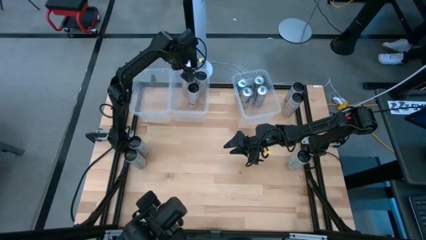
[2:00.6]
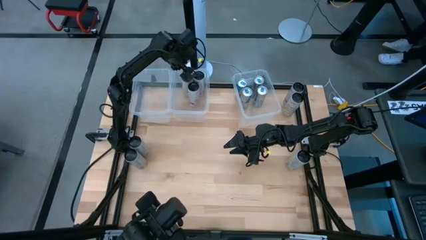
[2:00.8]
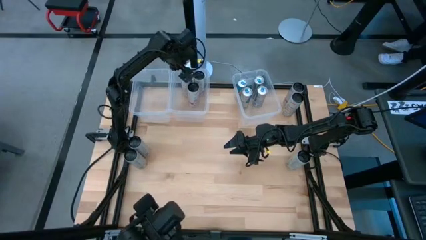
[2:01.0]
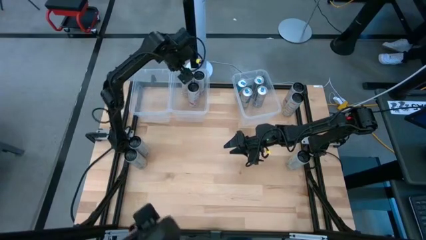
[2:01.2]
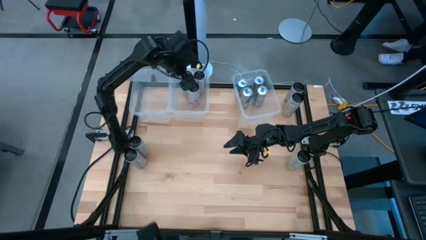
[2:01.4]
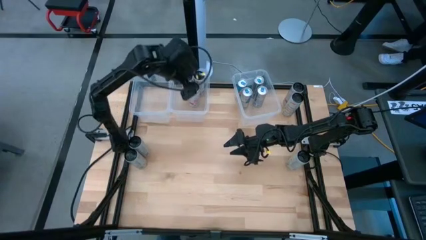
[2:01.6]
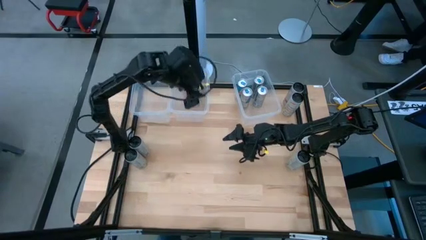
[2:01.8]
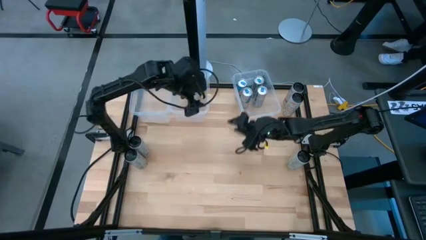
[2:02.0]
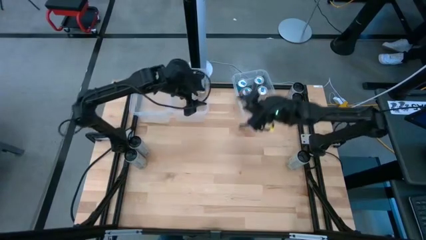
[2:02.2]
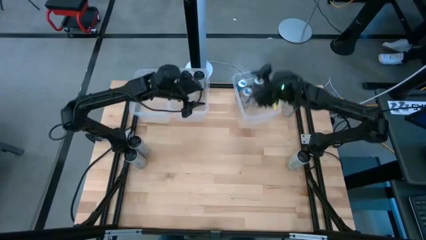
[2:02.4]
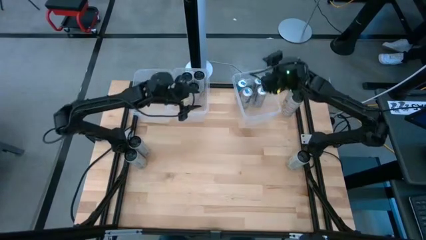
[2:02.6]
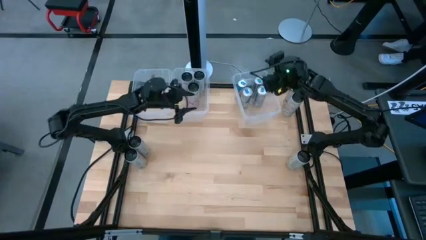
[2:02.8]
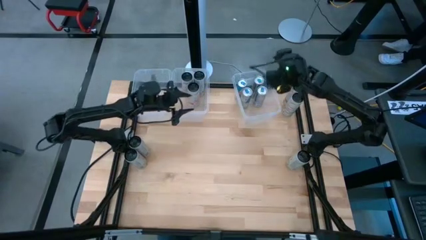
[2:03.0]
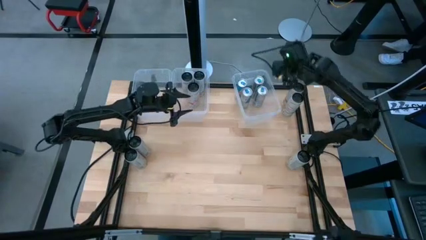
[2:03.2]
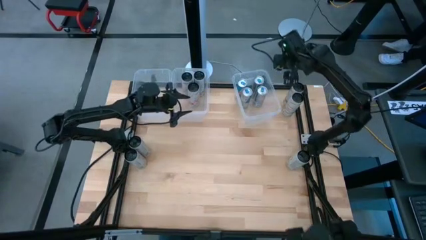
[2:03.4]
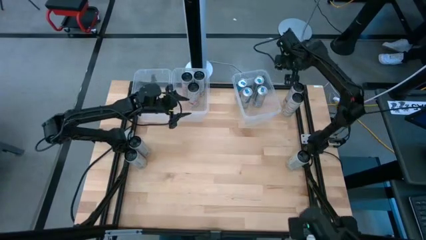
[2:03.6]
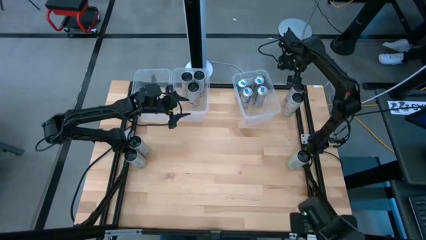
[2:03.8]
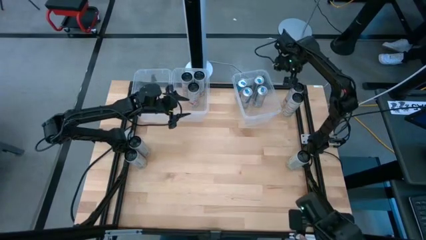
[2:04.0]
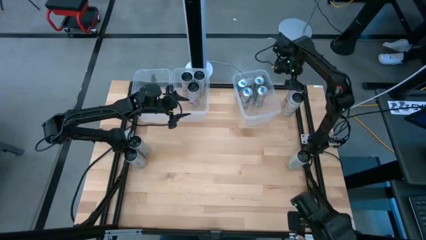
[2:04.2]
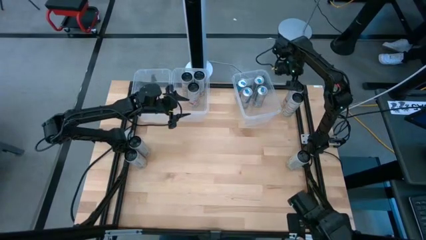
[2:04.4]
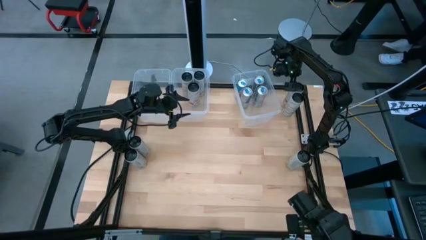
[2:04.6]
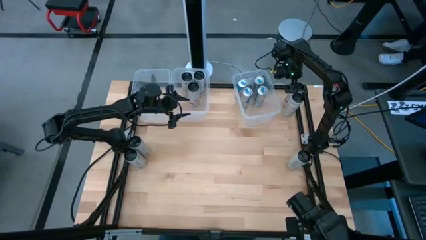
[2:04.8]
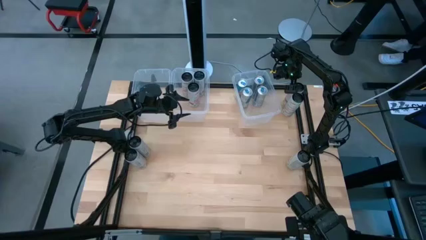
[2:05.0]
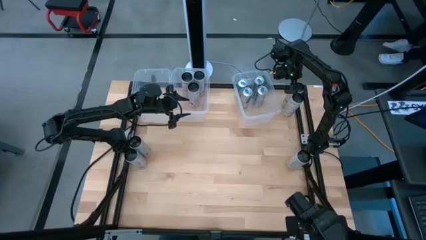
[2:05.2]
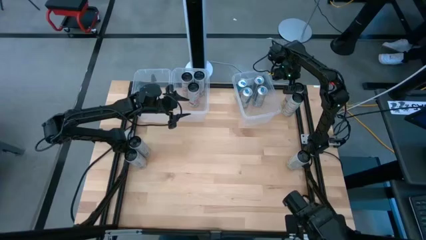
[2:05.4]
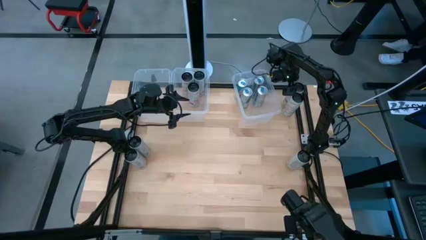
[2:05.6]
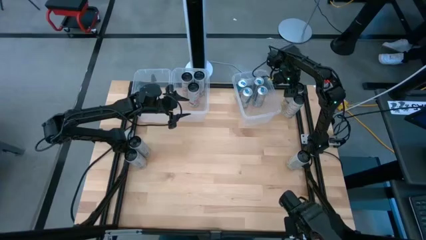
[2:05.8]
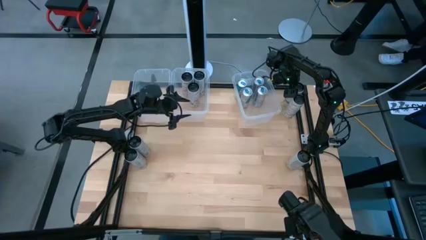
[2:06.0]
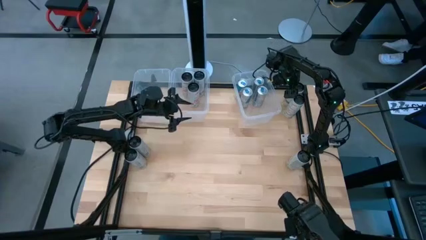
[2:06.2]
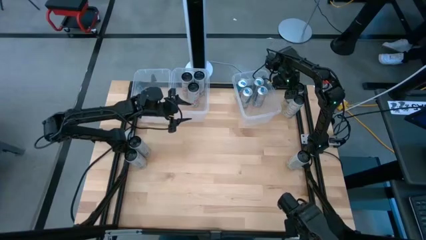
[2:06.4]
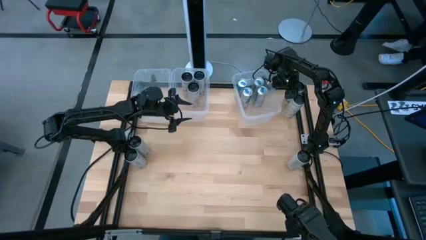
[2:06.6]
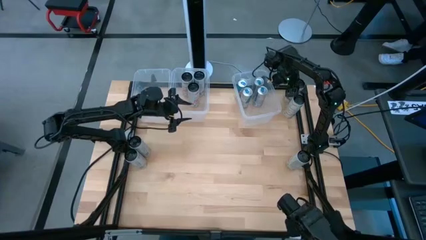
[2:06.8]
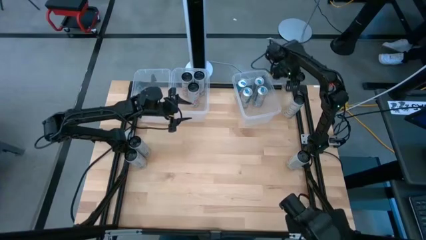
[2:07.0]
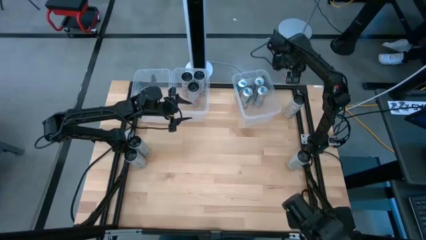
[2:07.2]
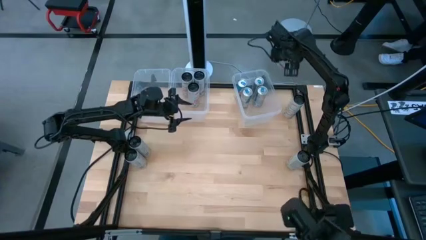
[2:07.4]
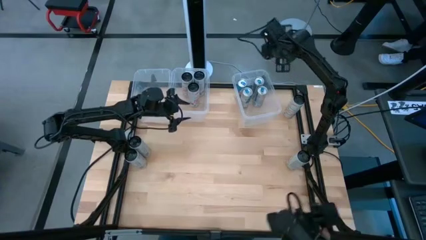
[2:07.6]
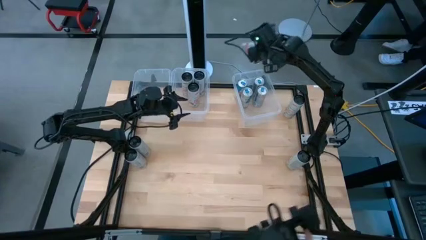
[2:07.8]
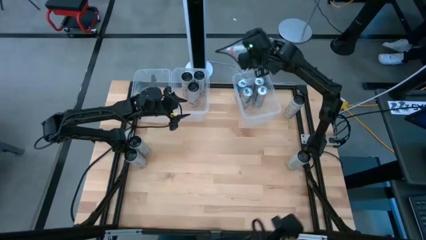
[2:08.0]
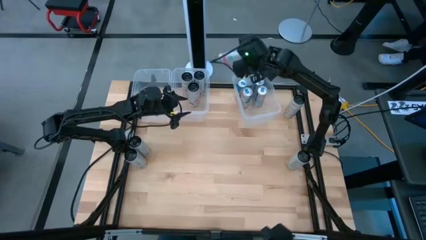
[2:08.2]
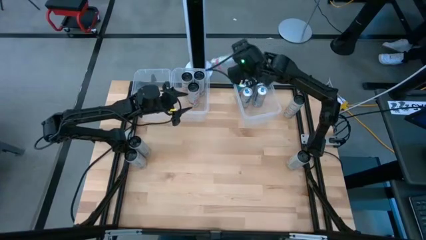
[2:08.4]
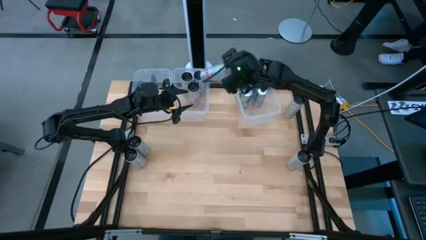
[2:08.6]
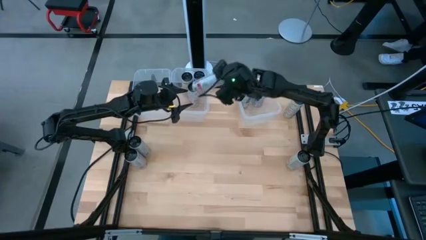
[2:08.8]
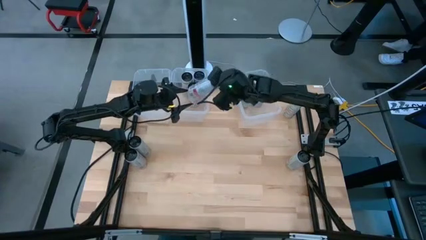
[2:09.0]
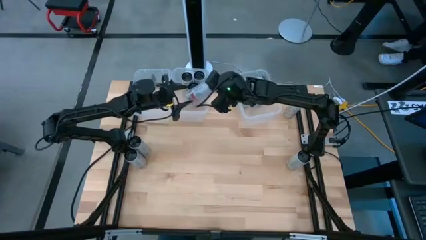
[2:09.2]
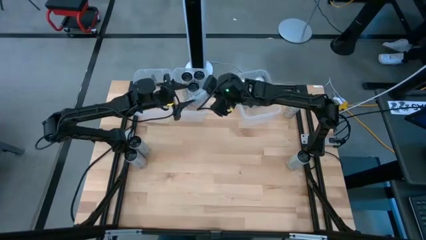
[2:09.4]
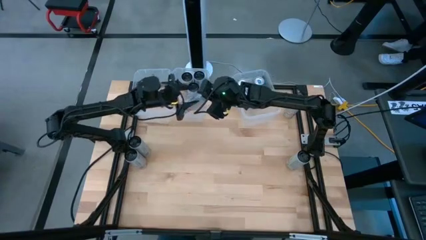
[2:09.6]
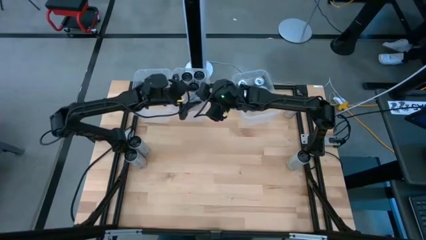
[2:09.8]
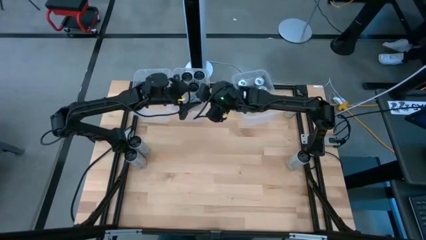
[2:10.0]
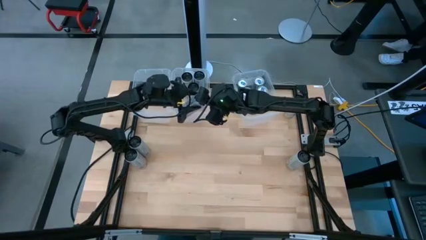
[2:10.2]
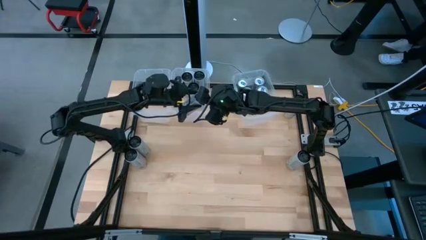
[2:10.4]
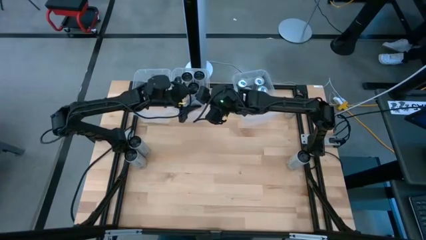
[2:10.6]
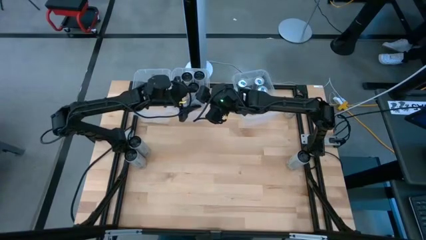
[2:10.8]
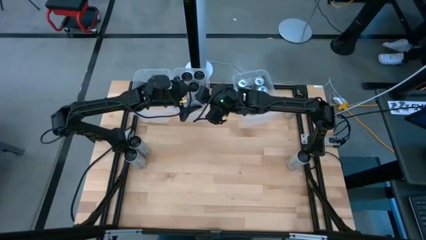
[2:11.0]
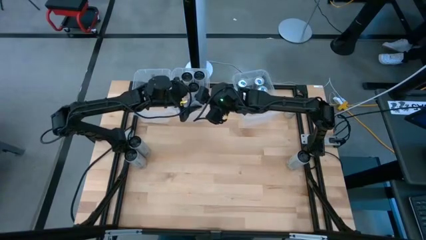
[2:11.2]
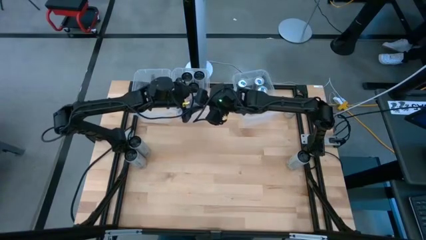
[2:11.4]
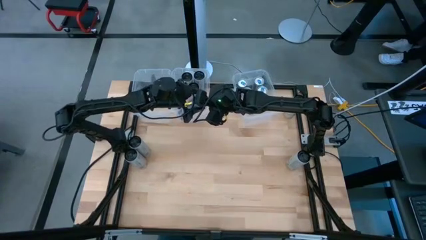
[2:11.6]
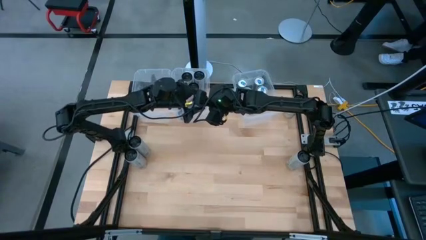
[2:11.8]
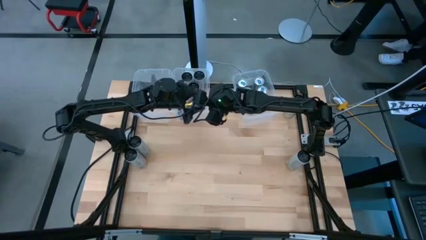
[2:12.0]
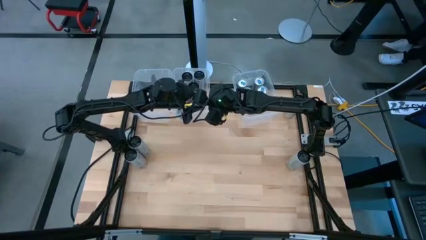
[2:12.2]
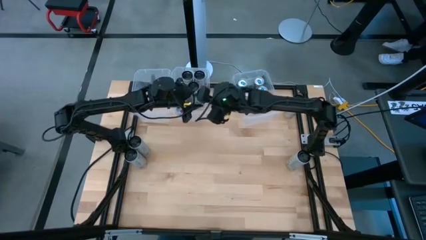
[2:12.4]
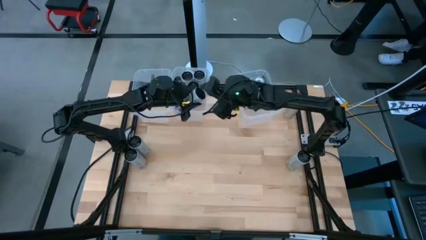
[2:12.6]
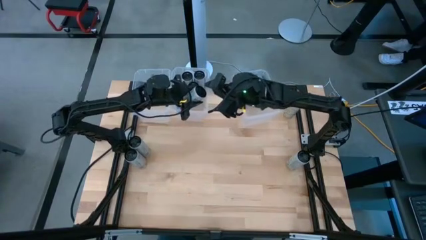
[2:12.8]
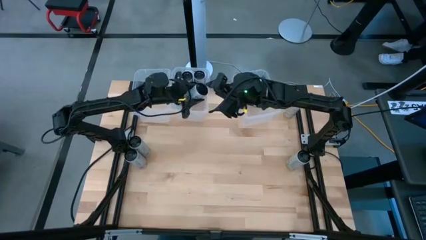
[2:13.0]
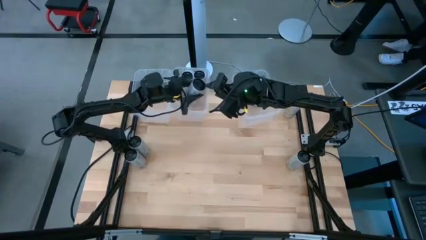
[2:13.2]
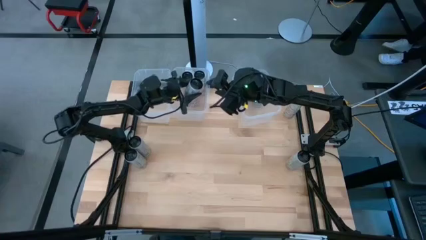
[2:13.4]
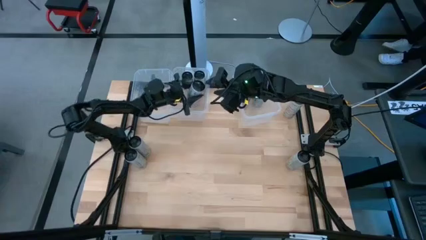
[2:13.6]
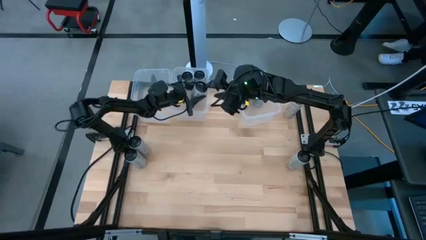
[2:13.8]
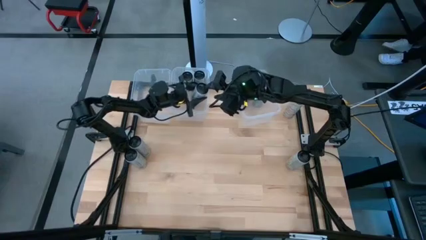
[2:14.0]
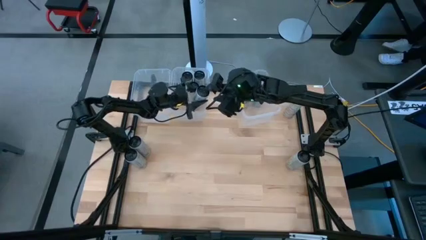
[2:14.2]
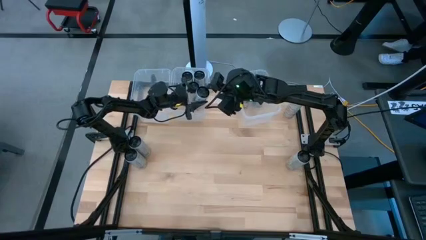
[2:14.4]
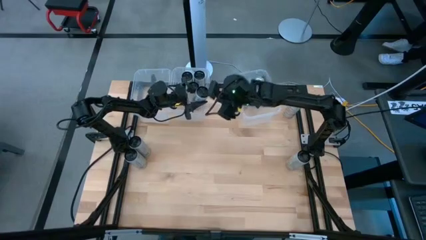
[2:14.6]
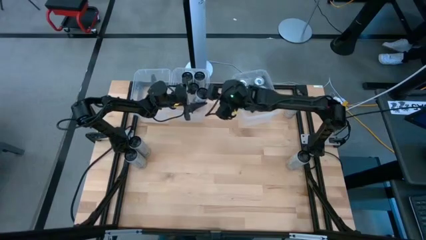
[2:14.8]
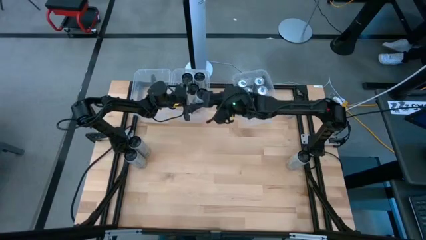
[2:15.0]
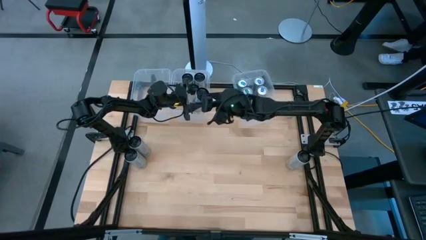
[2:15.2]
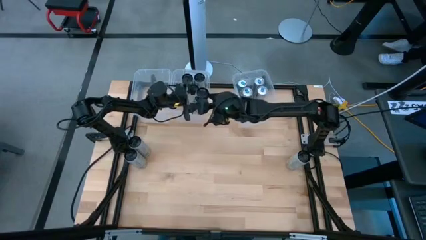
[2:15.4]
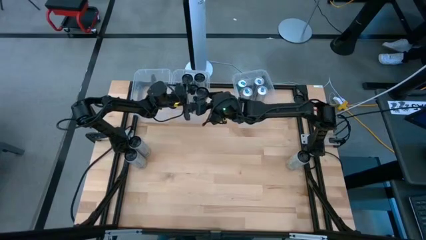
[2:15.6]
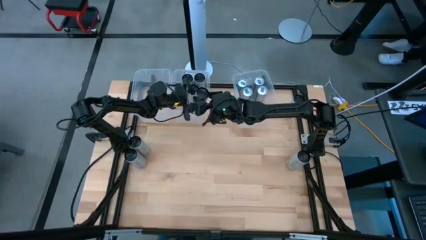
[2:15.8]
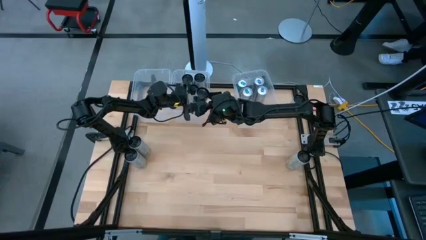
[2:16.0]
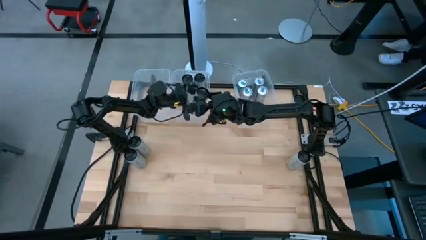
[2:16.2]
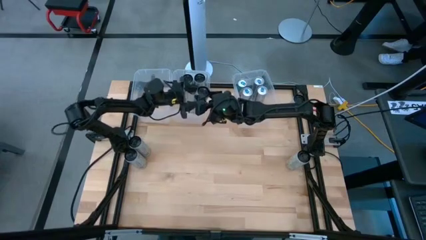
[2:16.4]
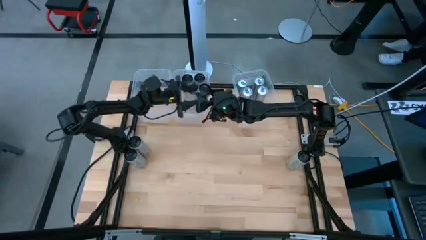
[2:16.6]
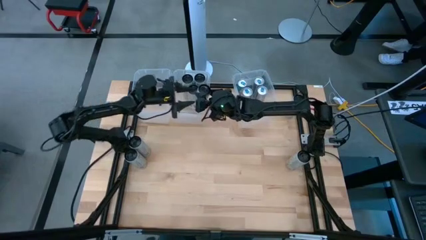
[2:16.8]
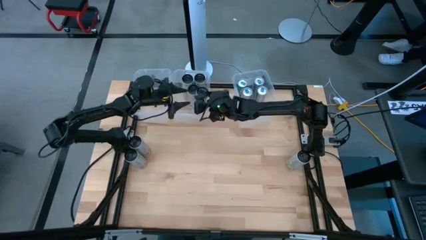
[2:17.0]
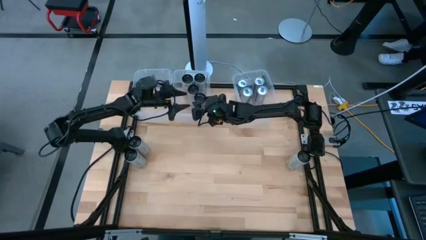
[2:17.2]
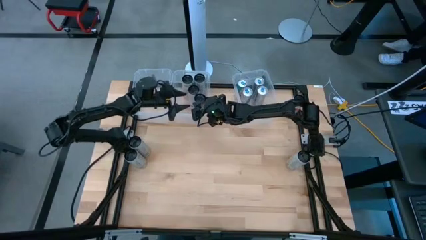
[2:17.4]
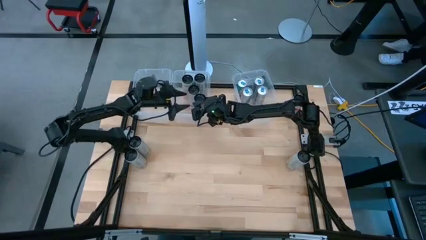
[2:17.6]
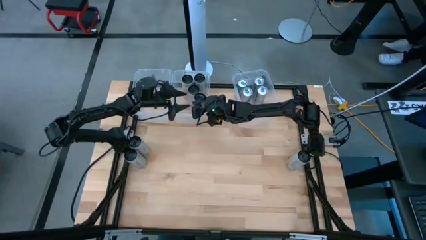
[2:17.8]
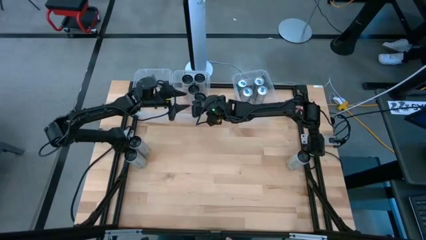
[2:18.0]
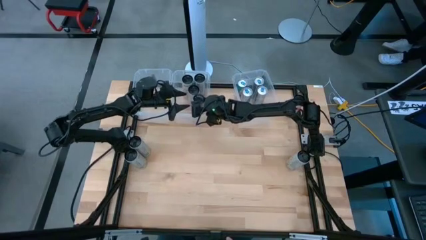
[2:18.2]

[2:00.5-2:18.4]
Task: Sort soda cans
Put the top right white-pink soda can into the top center transparent bin
